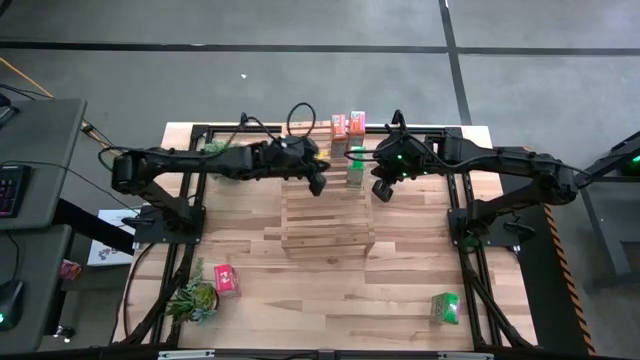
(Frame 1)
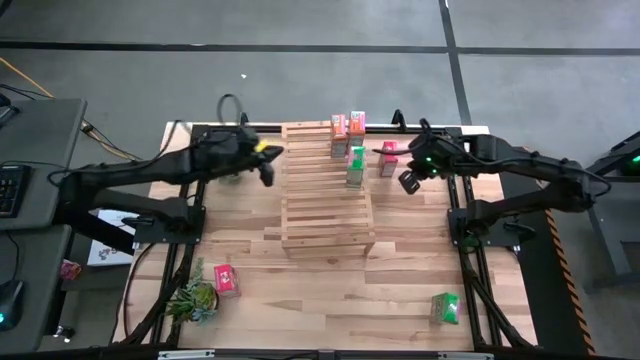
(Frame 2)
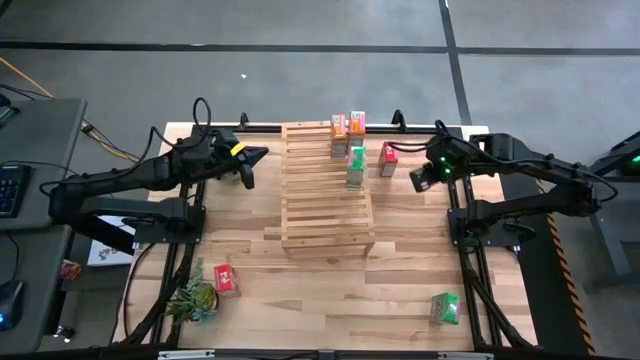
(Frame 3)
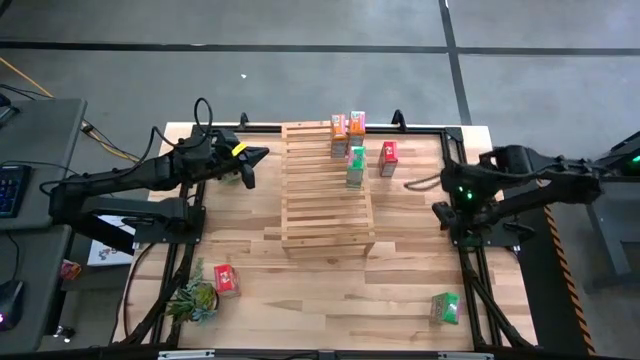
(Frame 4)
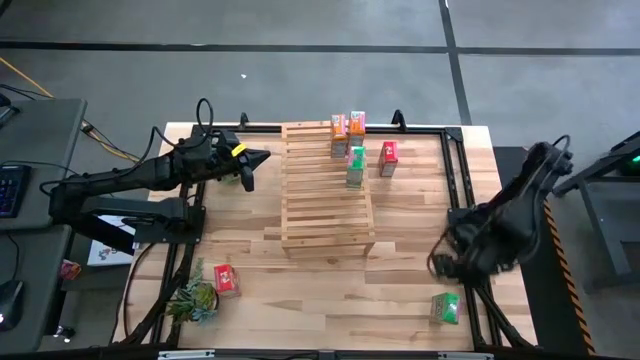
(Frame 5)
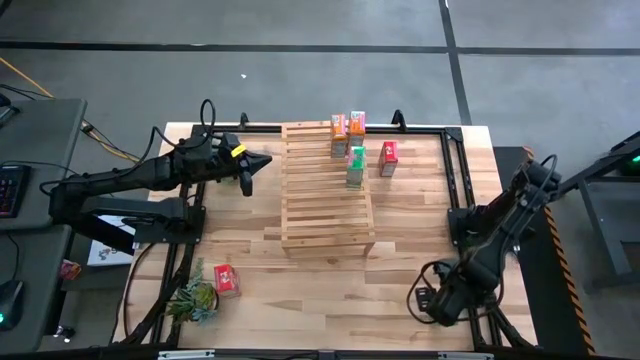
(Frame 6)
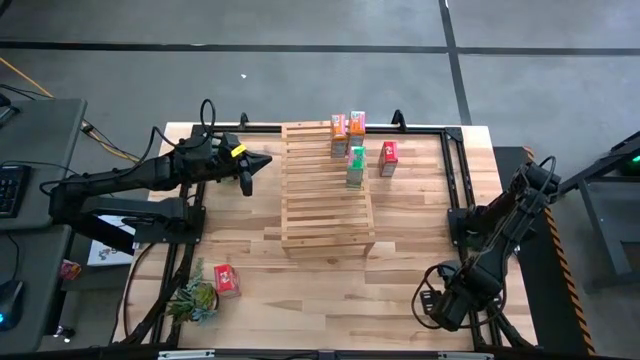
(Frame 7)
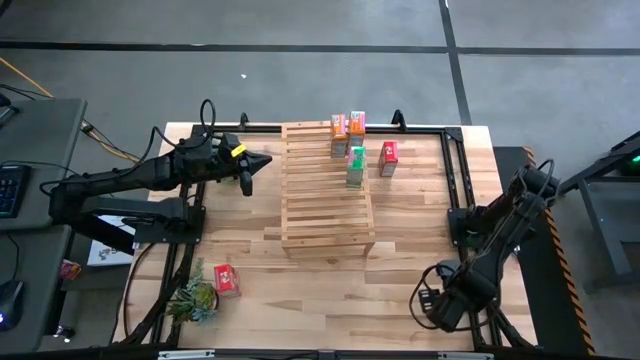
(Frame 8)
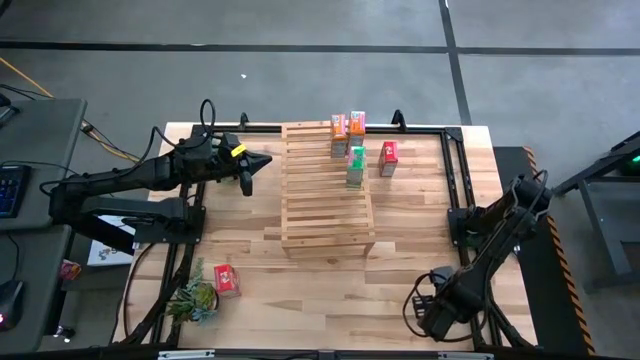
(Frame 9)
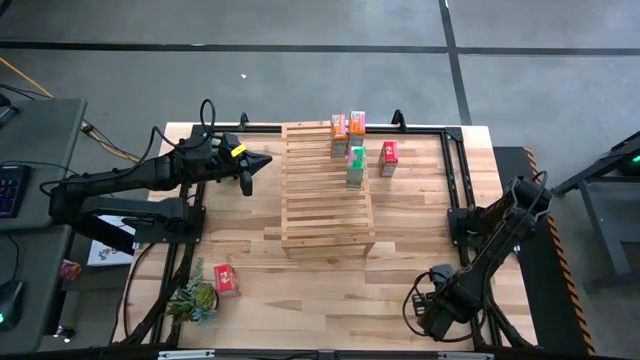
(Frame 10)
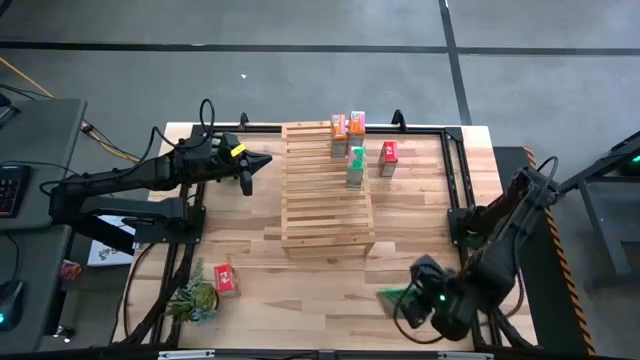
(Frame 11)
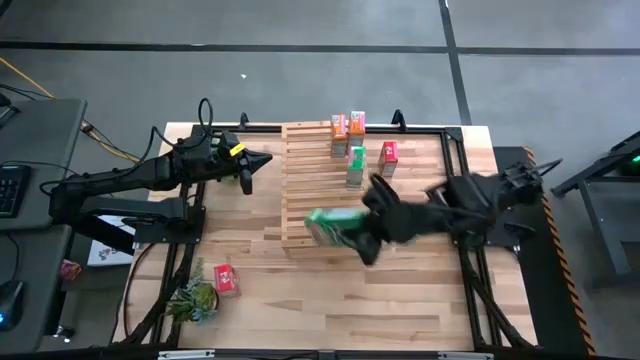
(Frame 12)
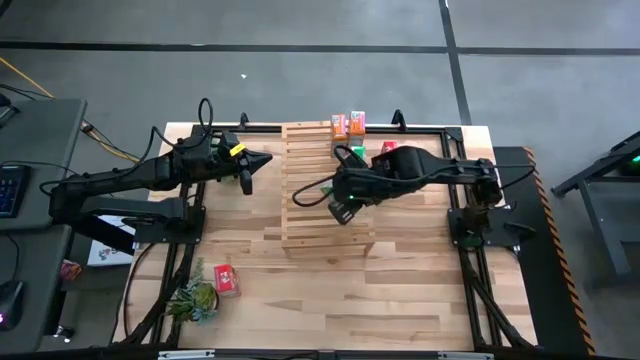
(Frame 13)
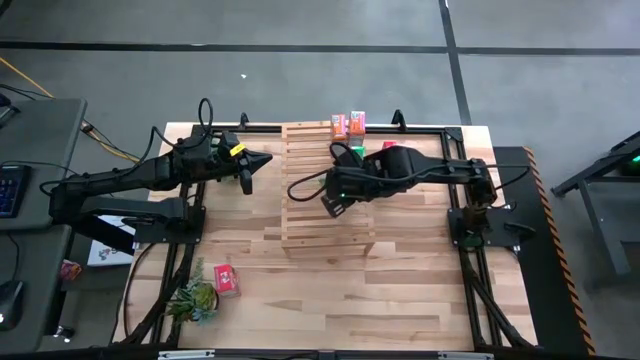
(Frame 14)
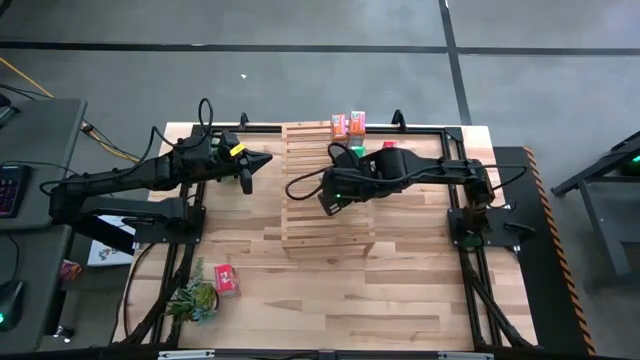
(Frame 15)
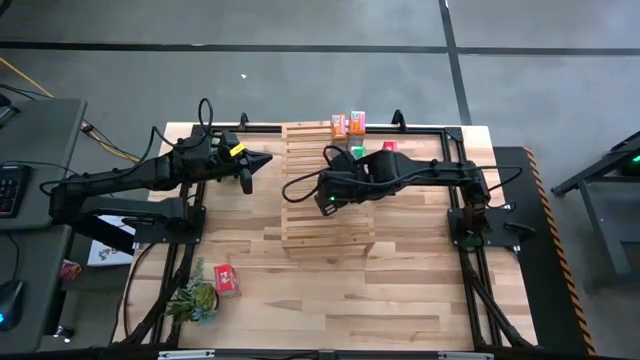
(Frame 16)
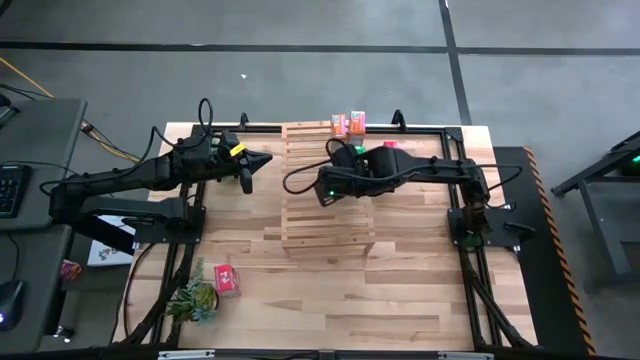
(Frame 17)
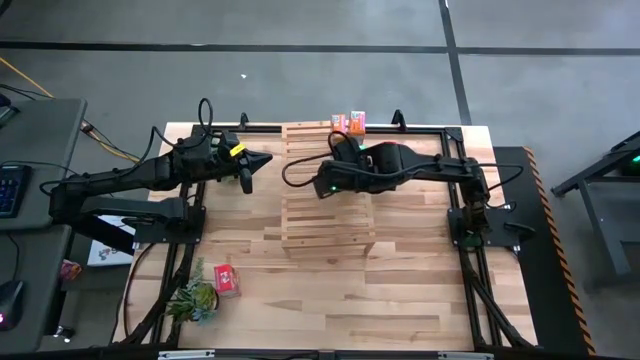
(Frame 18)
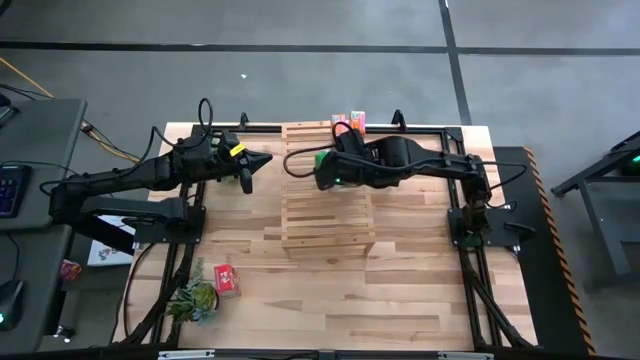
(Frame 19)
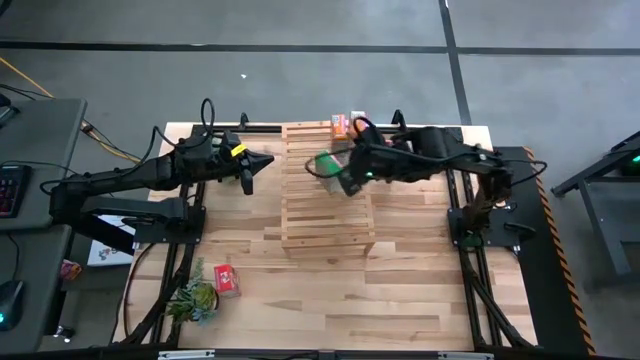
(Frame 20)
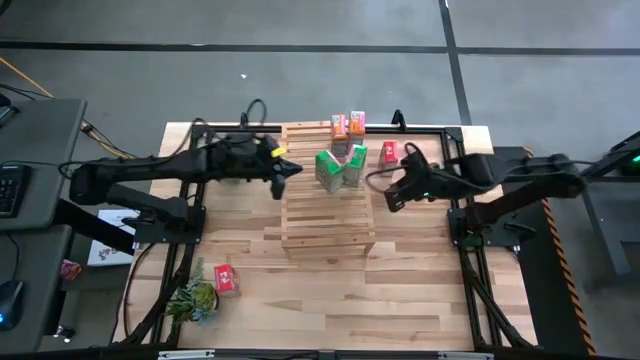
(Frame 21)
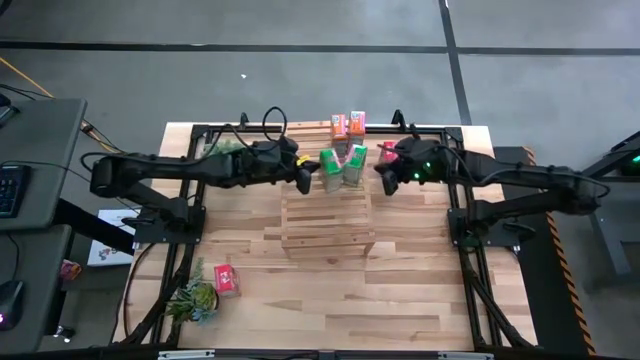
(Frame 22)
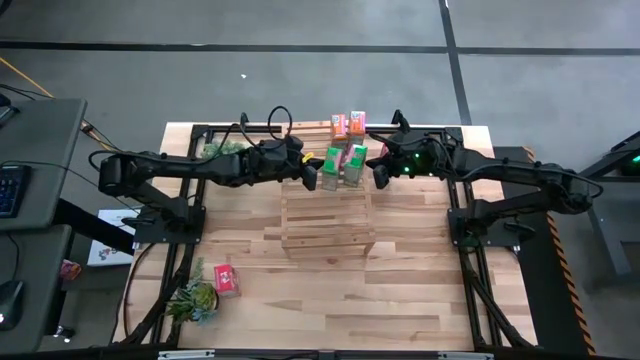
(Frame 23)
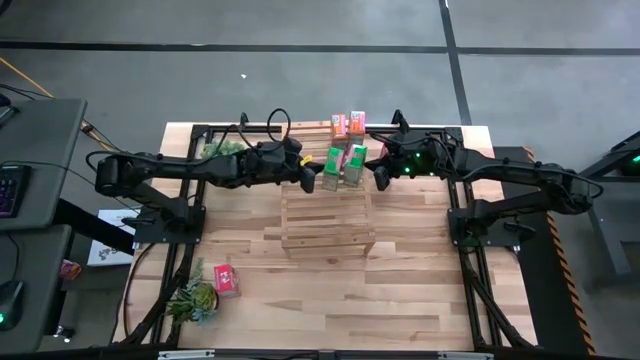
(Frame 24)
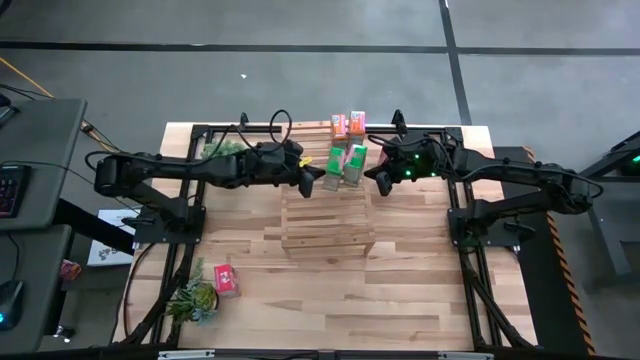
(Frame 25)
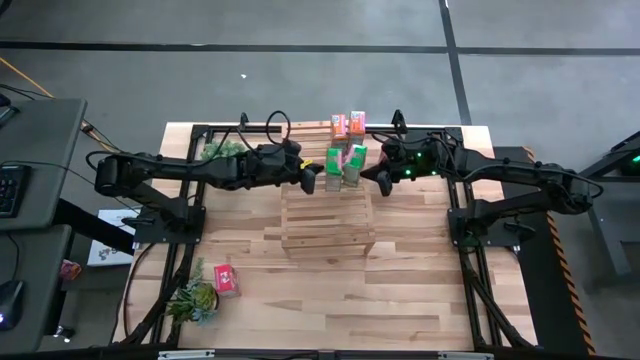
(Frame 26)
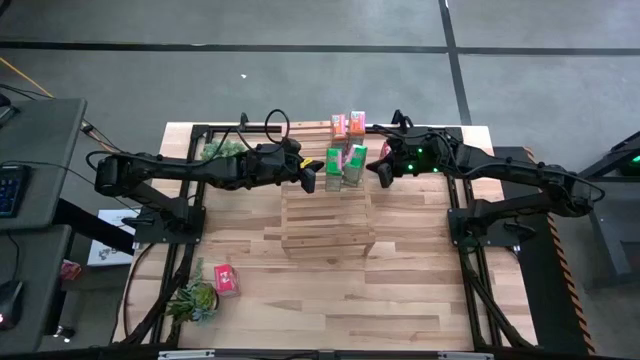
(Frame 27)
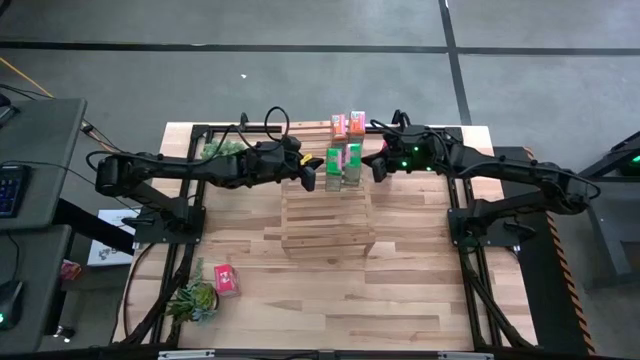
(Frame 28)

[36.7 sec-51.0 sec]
Task: Stack cereal on shelf
Put the green cereal box on the shelf aligned with the other green cereal box

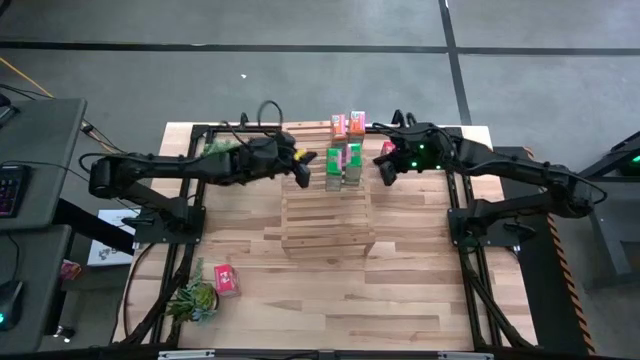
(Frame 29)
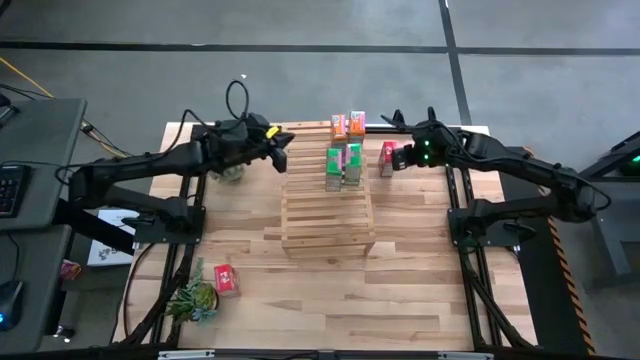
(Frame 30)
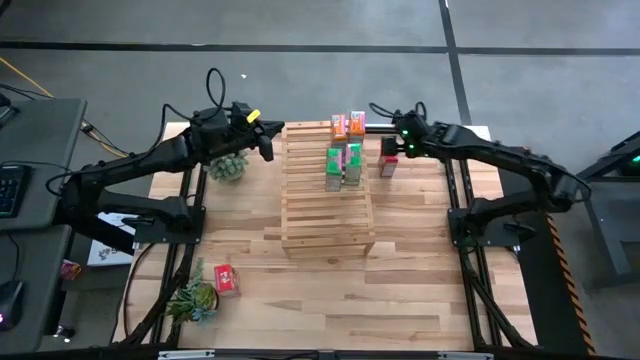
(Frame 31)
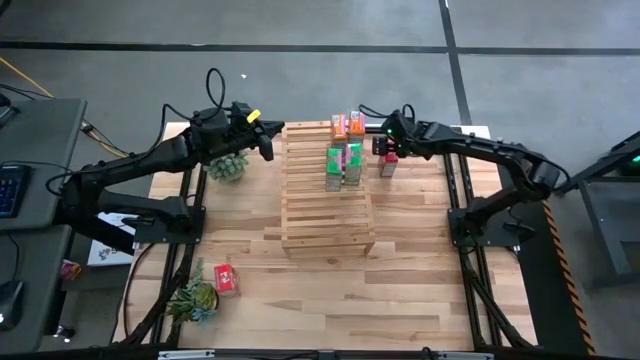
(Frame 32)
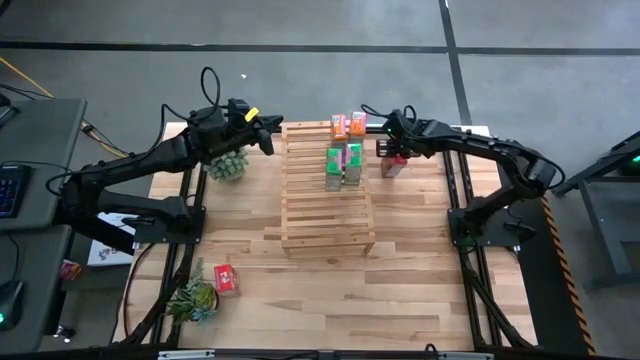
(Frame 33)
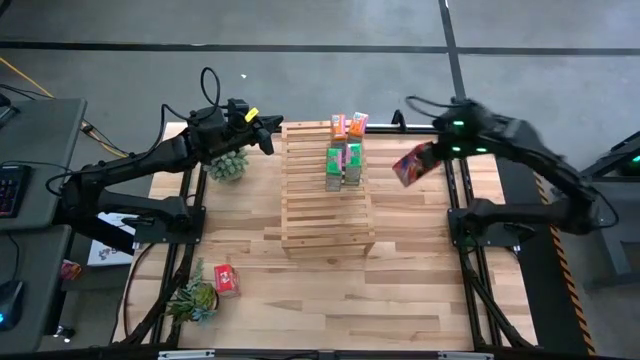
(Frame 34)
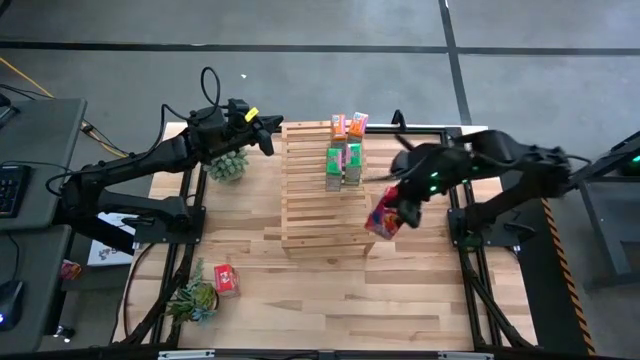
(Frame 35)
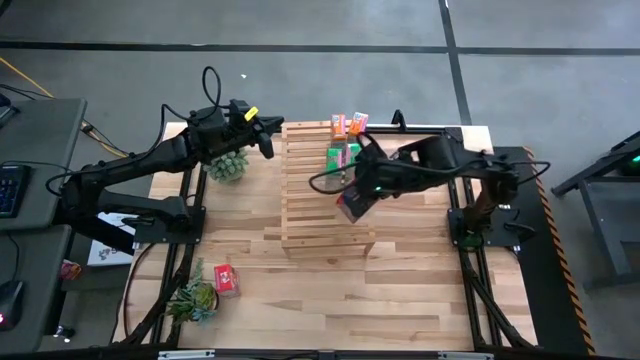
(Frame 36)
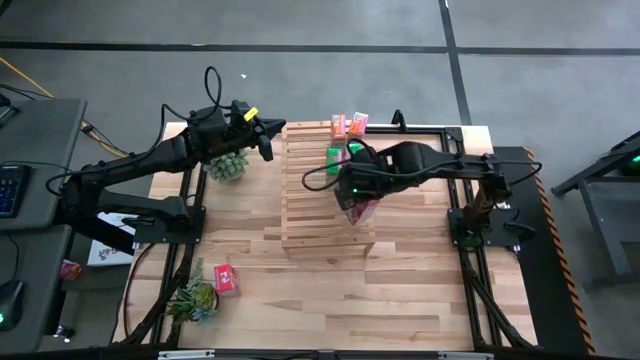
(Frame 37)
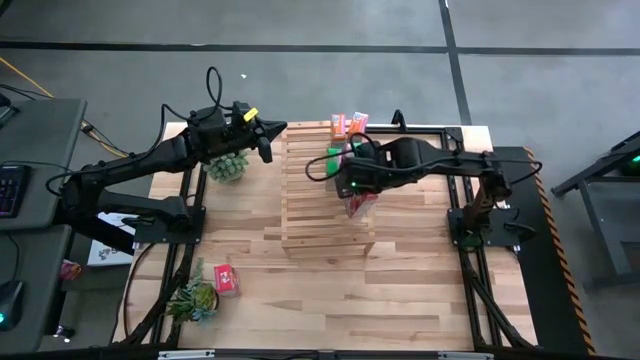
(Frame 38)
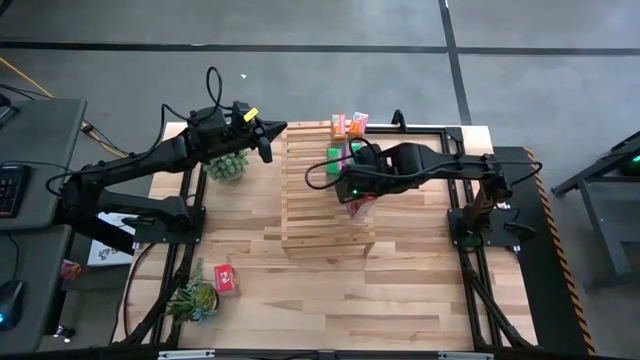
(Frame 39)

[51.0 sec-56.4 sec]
Put the top red cereal box on the shelf

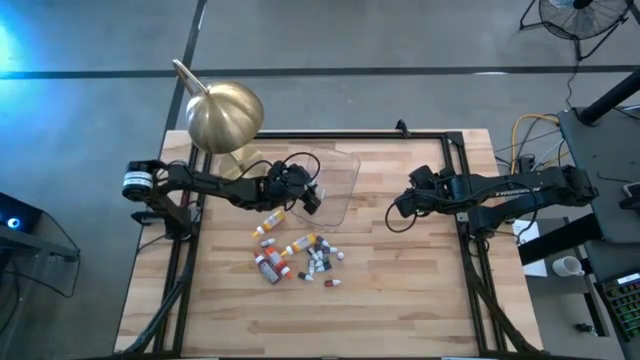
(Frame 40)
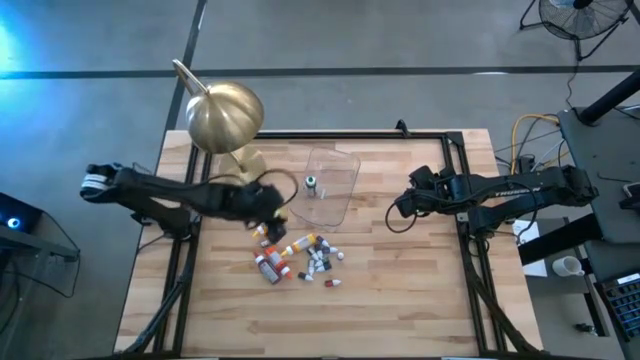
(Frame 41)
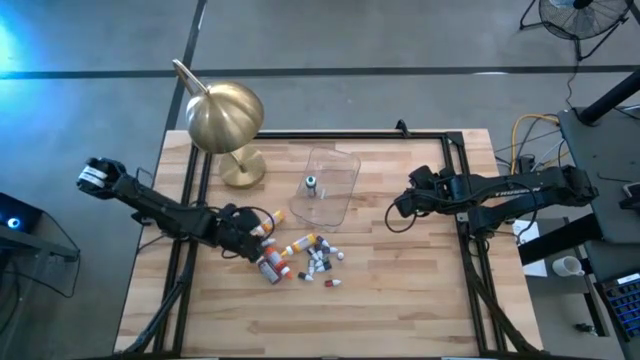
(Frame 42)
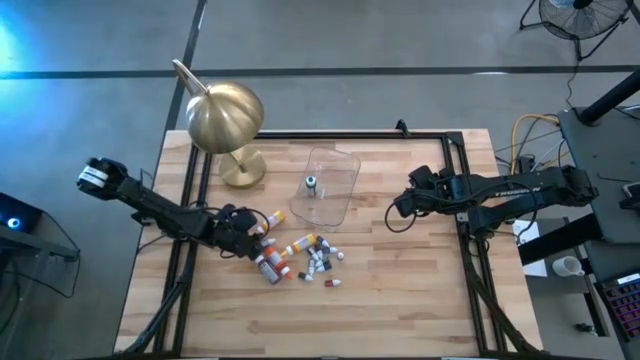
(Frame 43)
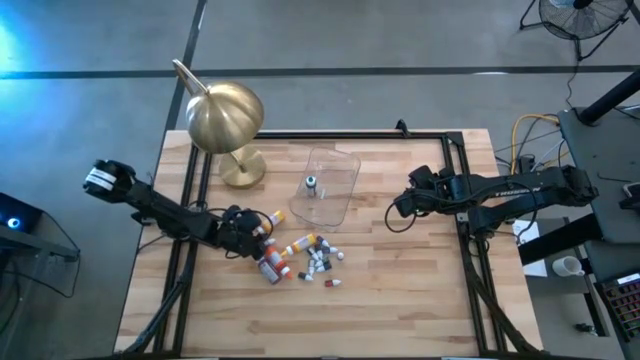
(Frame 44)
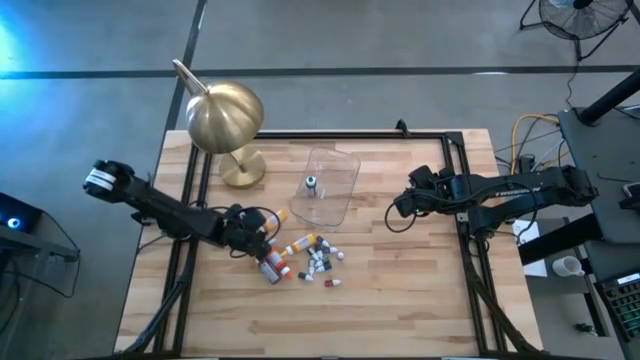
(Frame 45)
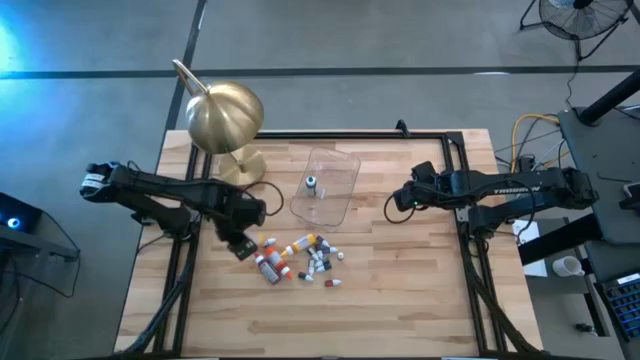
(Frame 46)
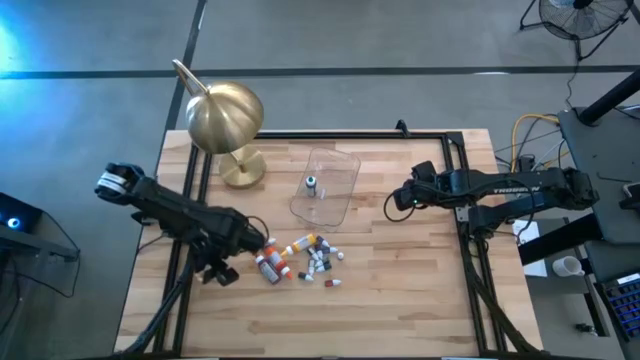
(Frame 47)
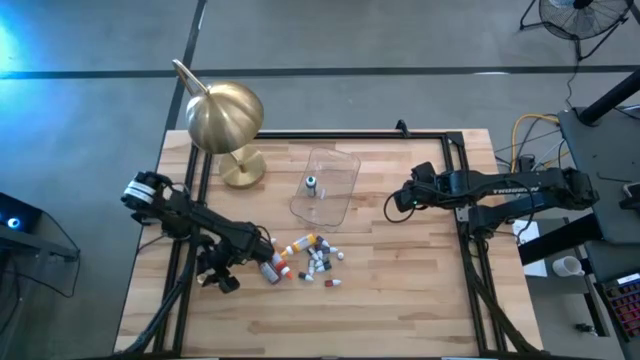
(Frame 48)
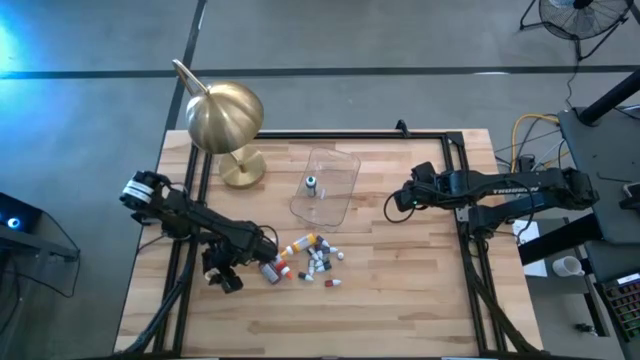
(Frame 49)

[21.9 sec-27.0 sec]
Task: Pick & Place food coloring
Move the left large yellow food coloring bottle to the lower left of the table
